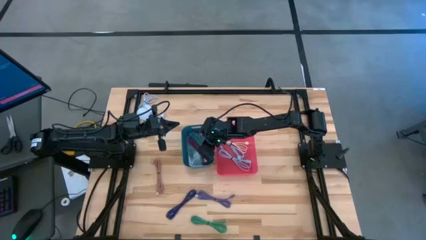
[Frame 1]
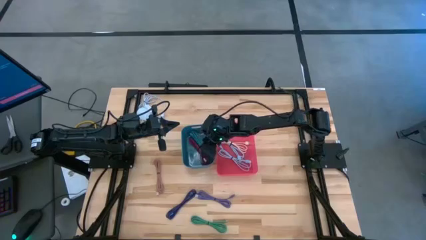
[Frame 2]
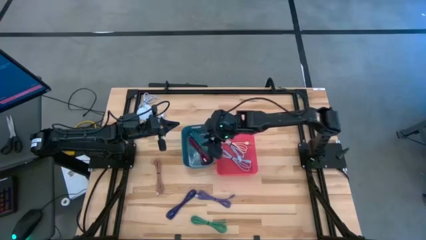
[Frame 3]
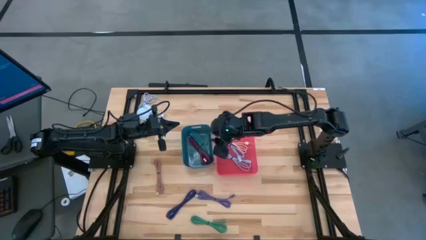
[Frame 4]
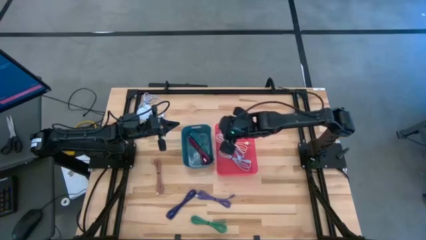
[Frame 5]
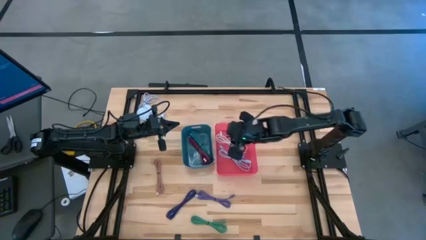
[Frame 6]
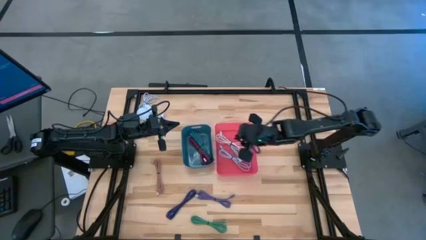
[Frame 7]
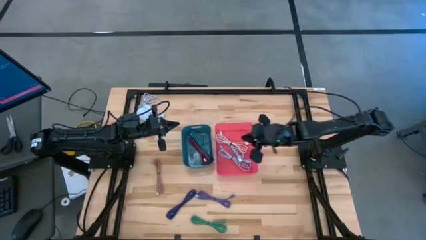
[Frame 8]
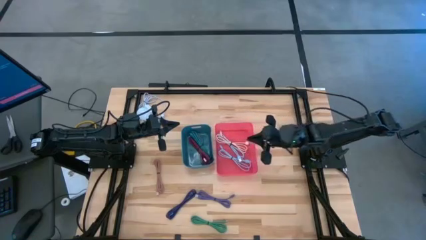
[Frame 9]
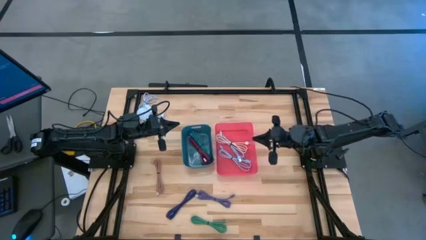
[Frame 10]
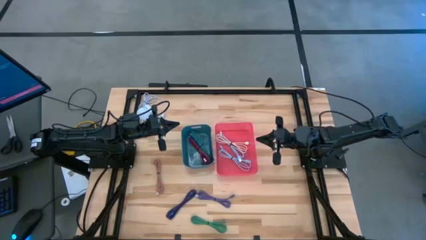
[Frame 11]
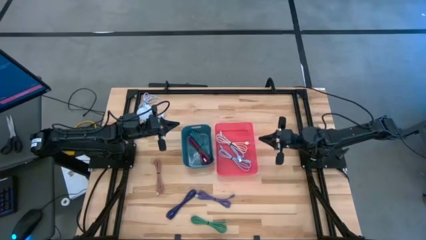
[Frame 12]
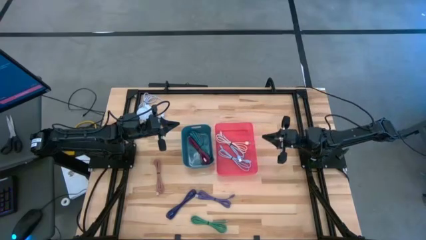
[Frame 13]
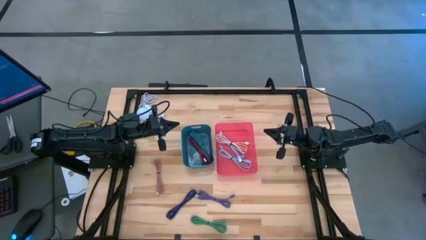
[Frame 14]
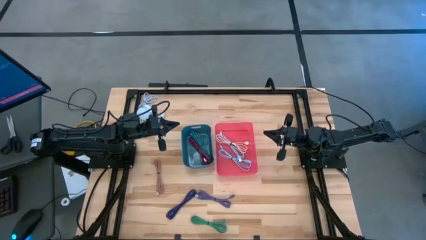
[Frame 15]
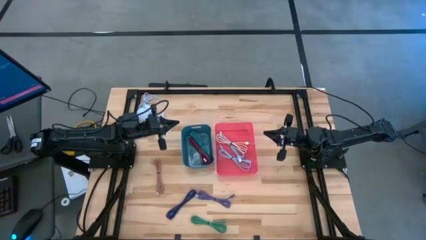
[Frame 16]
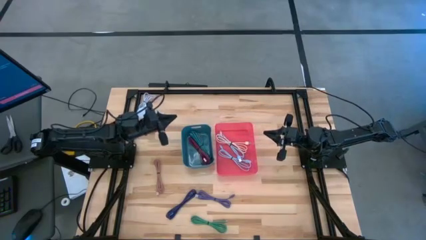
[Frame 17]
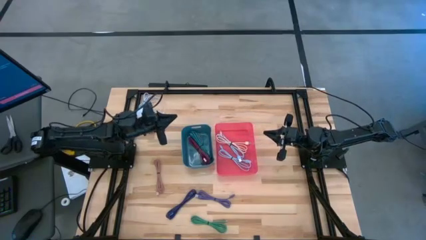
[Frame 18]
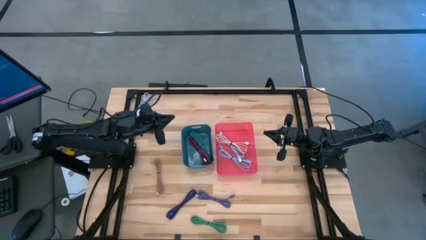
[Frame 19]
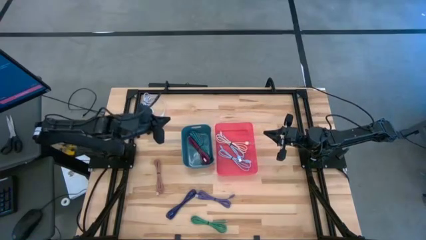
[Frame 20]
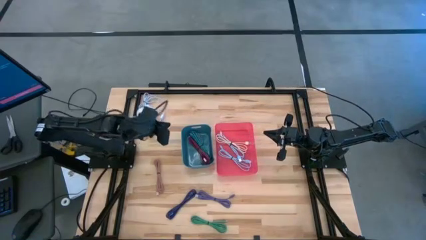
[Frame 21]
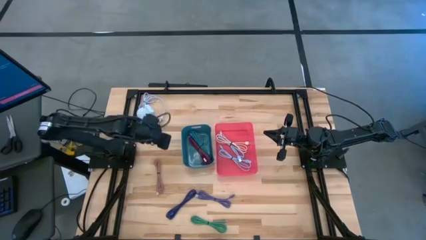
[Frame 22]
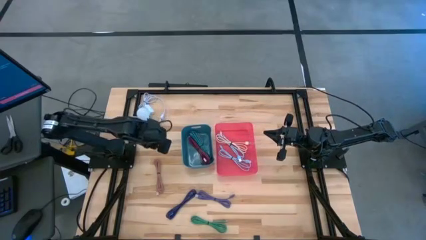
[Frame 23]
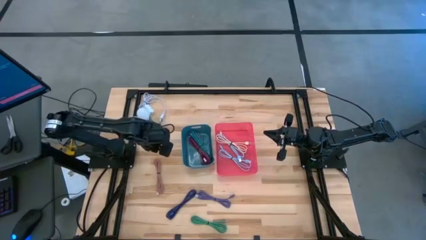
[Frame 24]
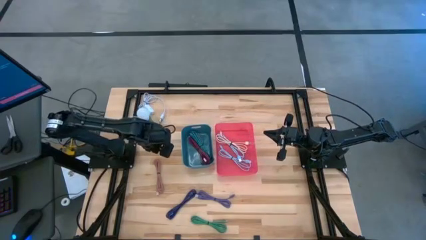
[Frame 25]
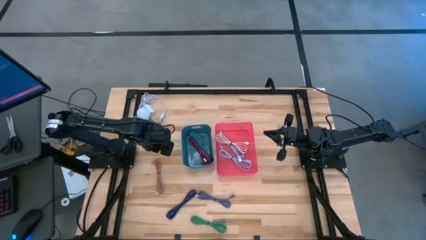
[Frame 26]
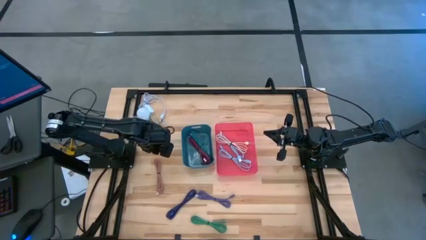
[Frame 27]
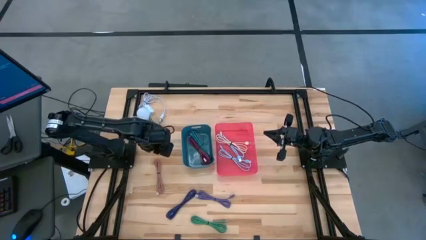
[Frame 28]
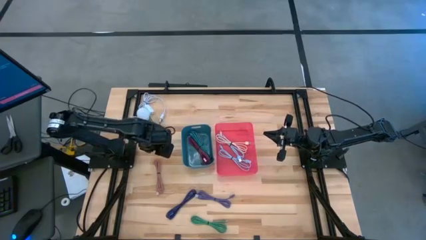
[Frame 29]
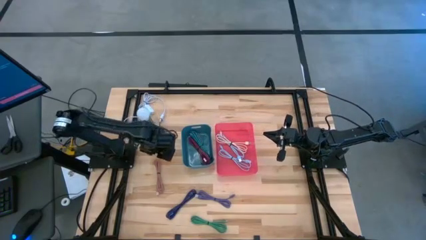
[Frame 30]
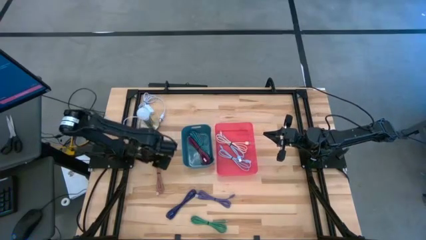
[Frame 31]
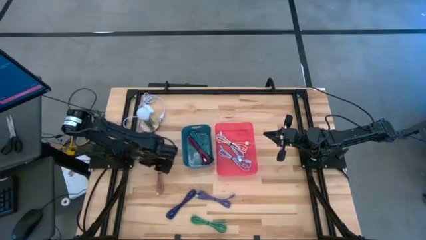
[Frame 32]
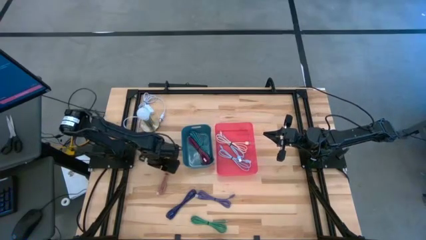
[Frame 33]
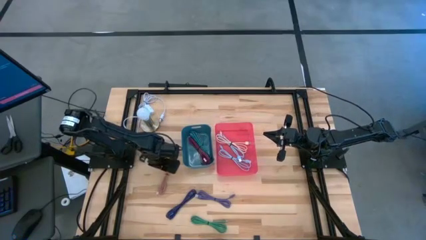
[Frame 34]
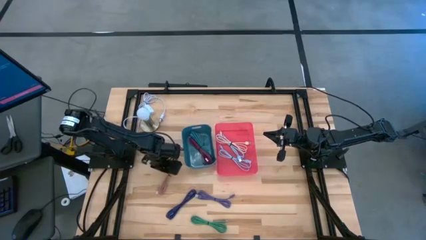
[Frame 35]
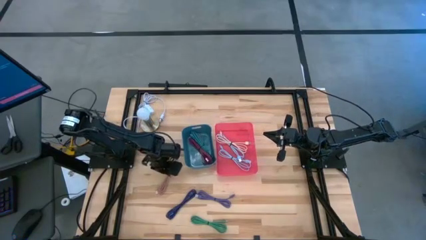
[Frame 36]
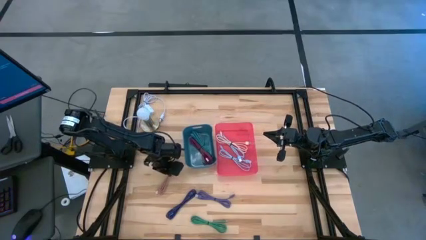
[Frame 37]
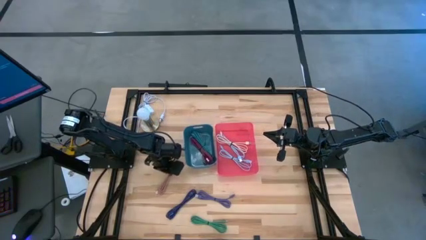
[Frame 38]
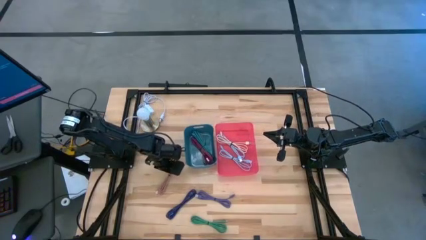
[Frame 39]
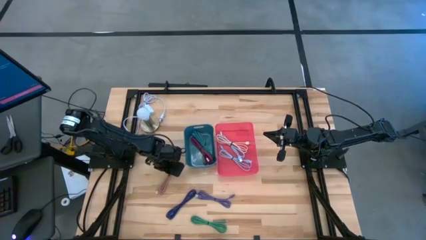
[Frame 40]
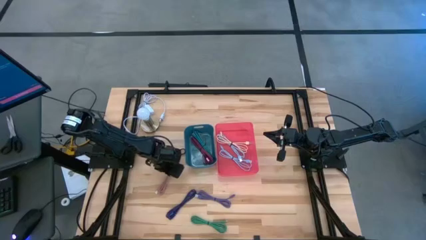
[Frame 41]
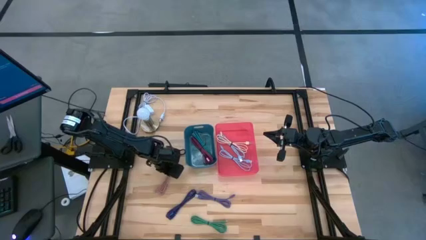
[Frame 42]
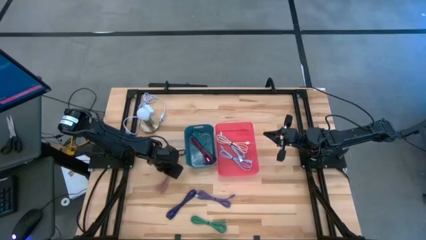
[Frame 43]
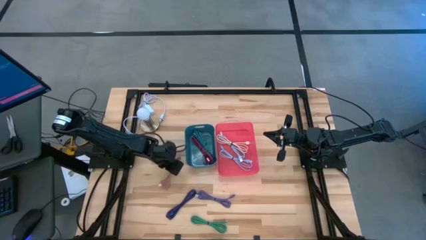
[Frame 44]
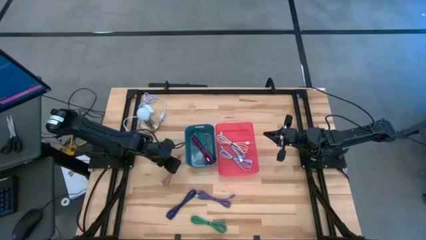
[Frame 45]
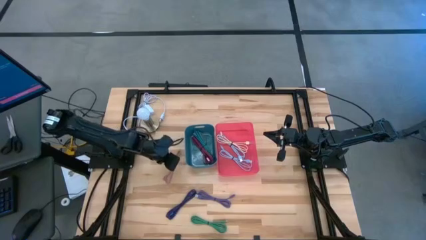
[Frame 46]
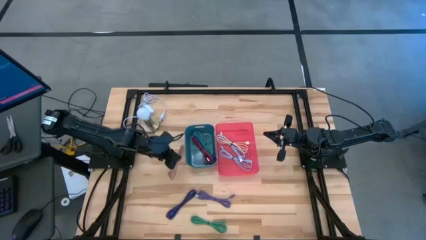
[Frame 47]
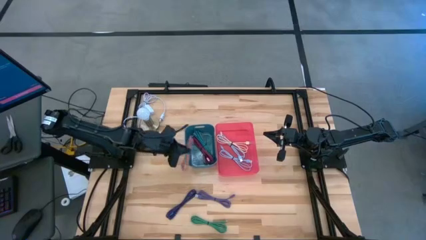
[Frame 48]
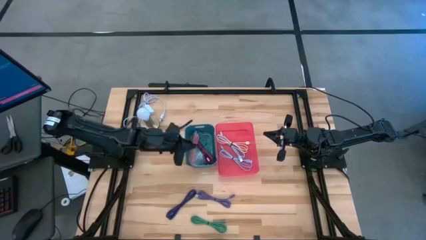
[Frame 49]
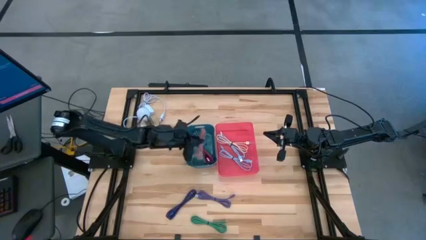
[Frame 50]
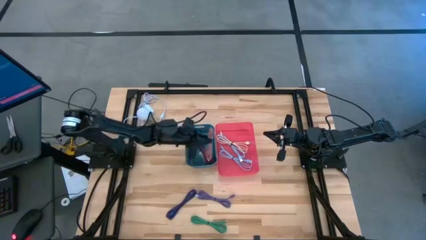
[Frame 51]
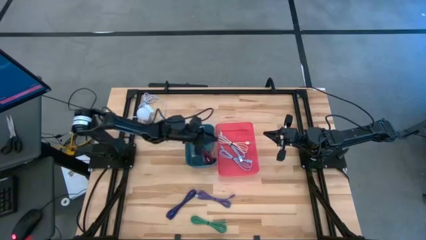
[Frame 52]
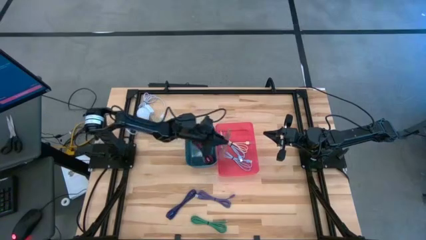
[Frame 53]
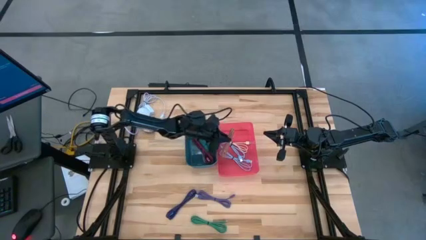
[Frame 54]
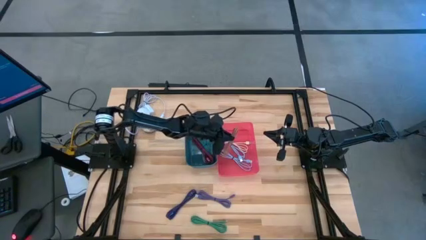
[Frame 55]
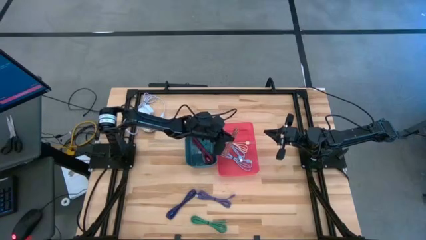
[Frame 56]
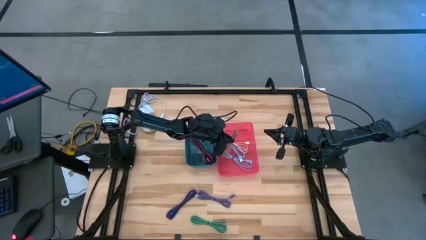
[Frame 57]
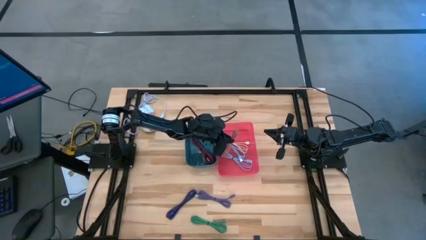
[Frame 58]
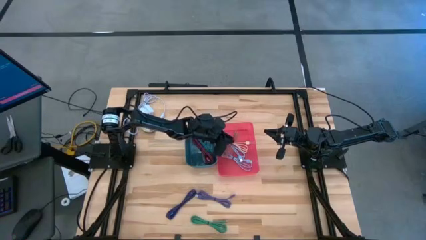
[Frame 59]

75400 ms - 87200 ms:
Task: Pick & Place USB Port
Put the pink charger cable into the red bin

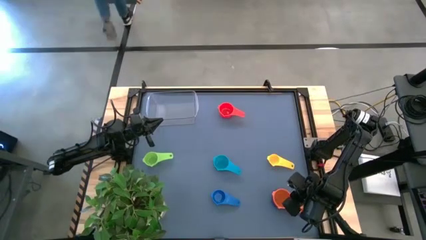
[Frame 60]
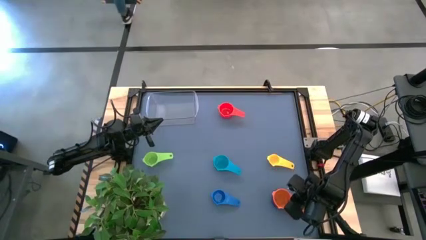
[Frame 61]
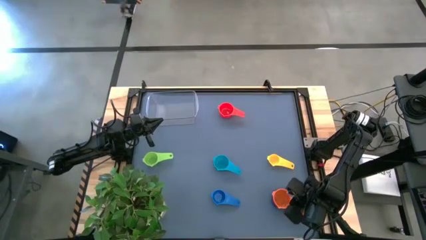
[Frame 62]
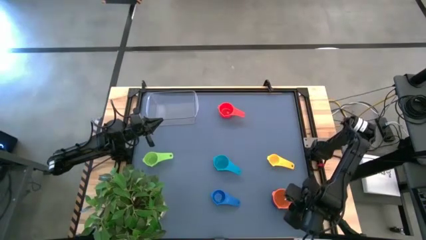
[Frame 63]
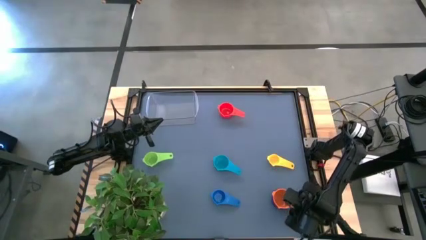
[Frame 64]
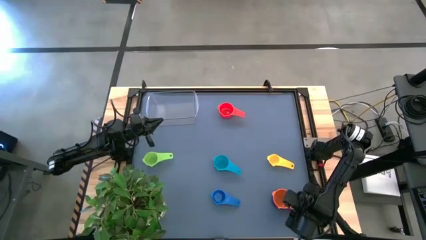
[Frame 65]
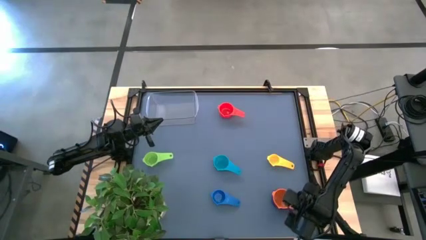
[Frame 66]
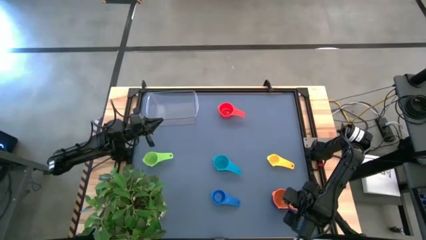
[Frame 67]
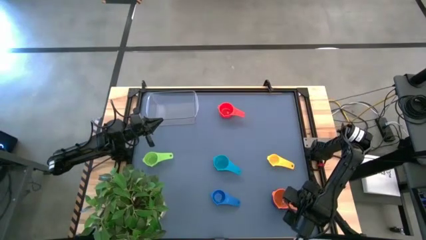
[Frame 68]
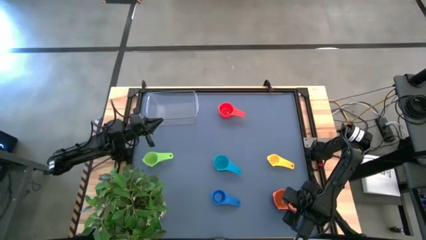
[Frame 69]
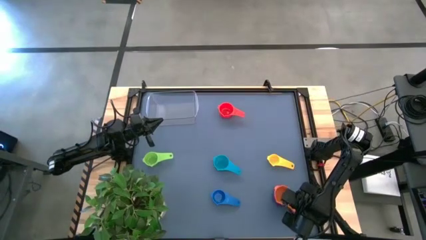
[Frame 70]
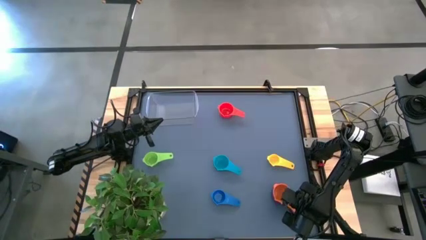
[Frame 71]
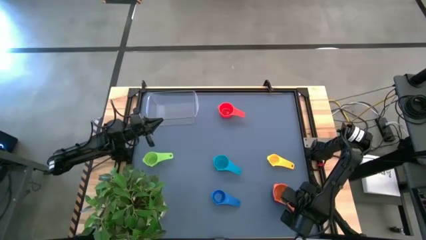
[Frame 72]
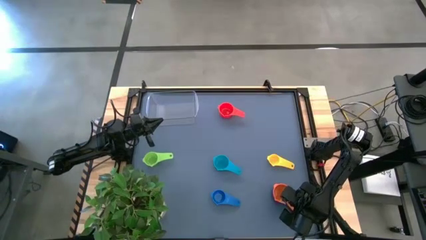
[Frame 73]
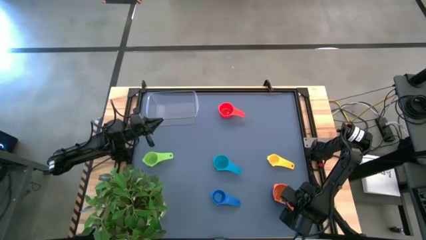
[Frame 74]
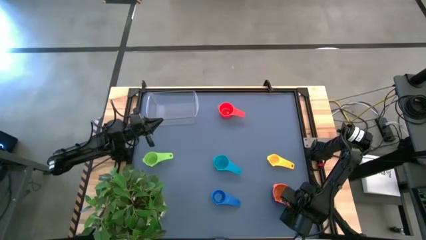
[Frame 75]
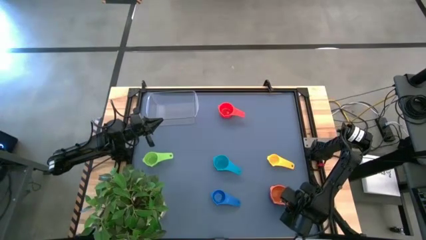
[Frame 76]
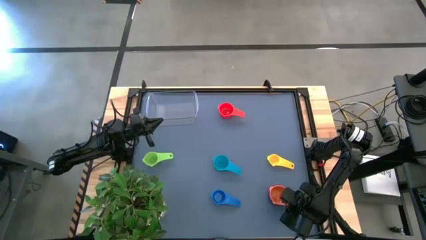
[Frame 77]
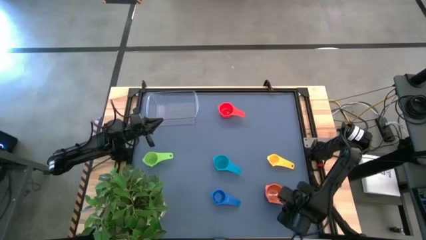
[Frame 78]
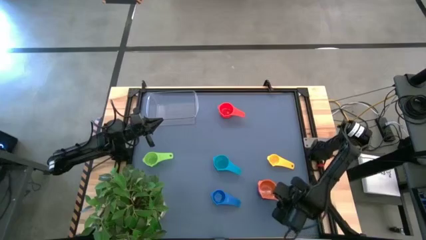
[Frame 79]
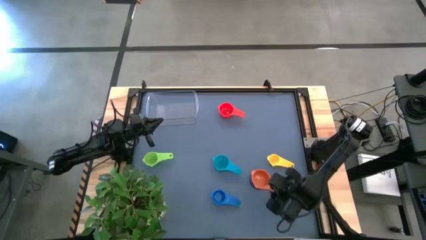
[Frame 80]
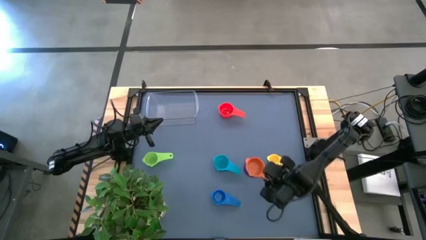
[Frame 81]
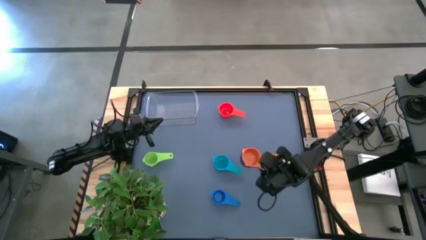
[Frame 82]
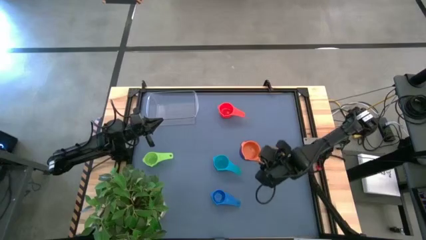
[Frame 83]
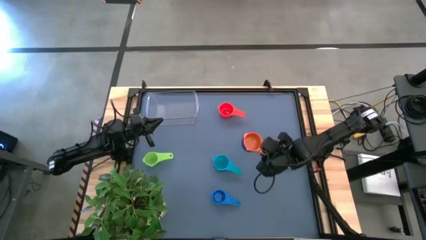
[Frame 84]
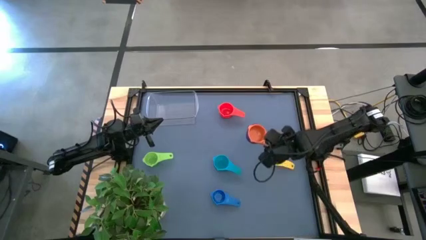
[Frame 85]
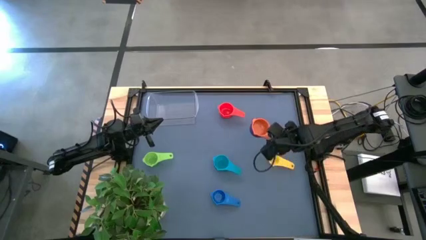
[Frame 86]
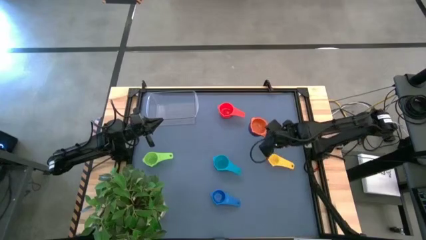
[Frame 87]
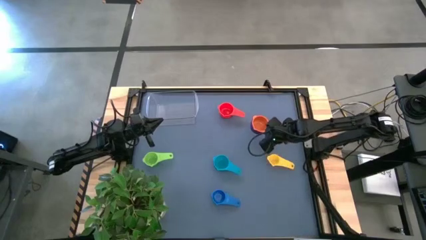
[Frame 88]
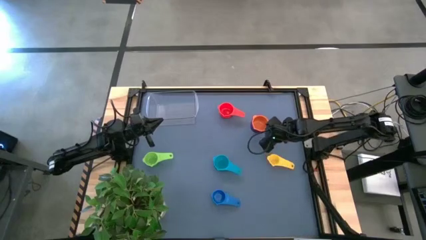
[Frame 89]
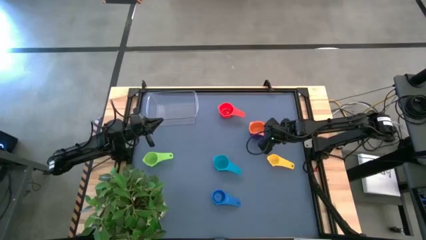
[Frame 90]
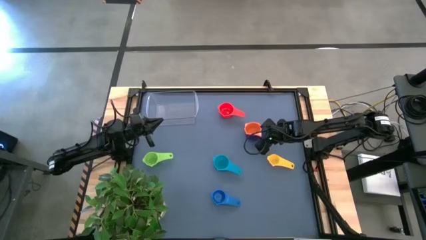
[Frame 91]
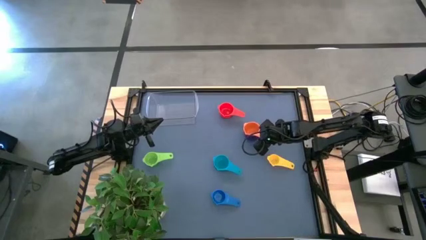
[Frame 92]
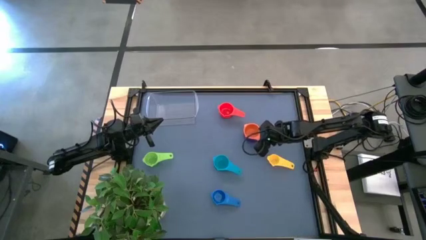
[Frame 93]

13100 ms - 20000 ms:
Task: Nest measuring cups in basket
Move the nested measuring cup to the middle right of the table
